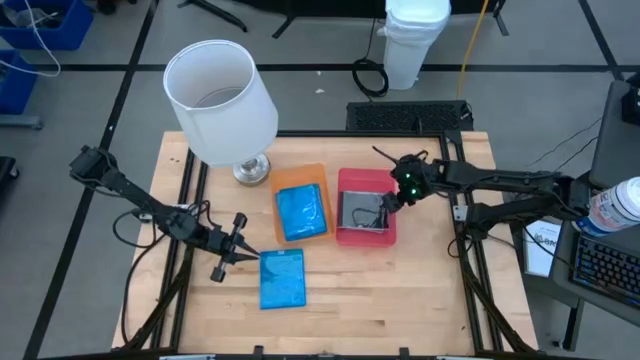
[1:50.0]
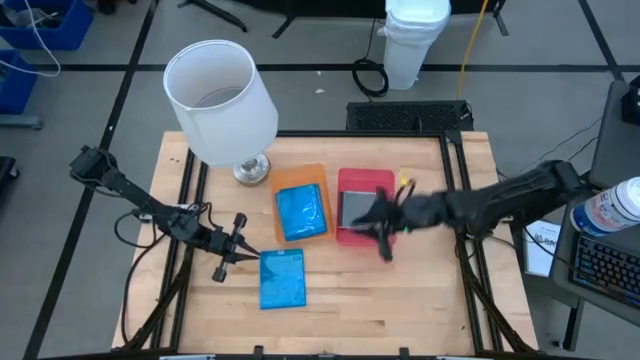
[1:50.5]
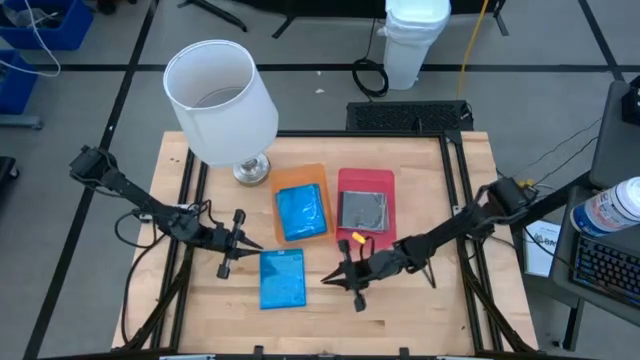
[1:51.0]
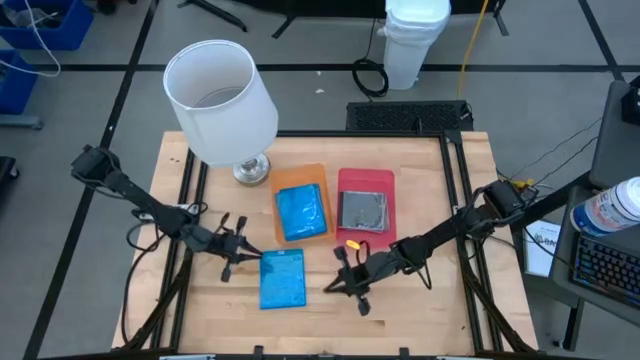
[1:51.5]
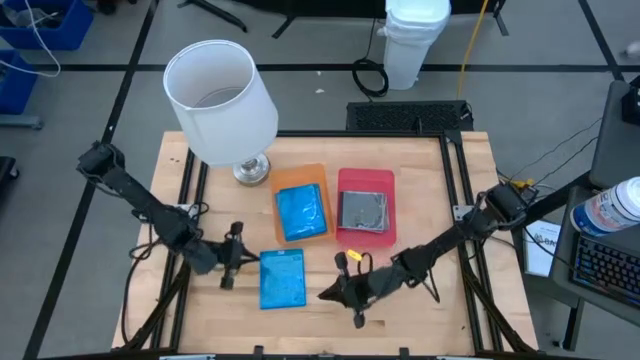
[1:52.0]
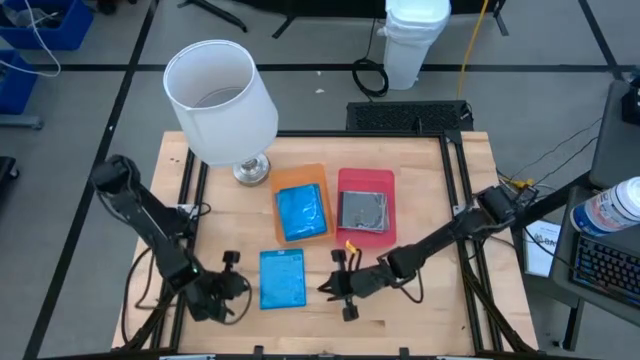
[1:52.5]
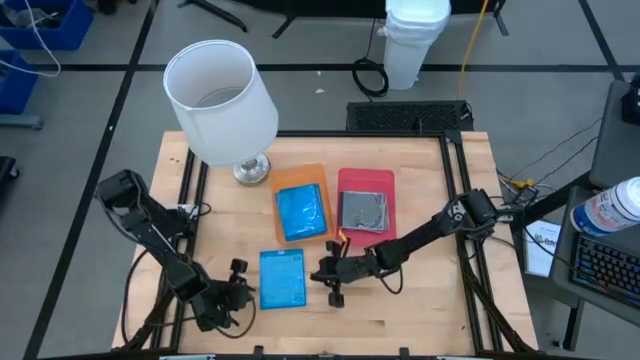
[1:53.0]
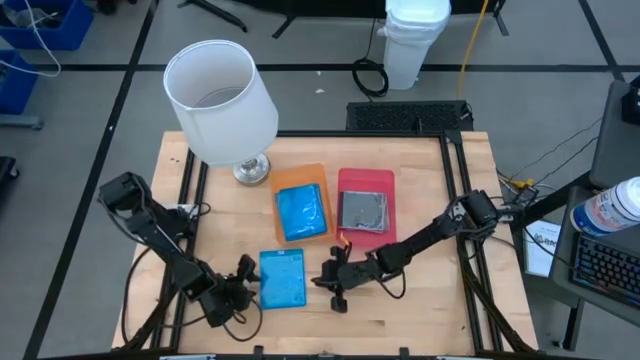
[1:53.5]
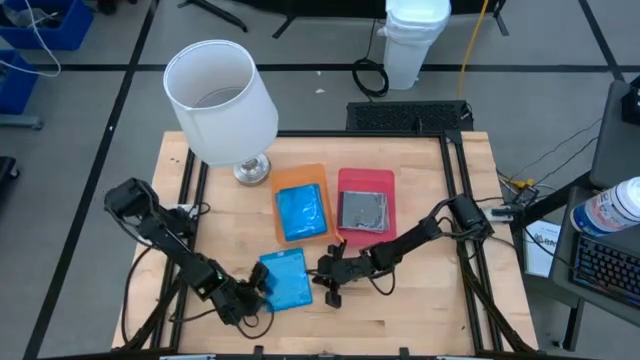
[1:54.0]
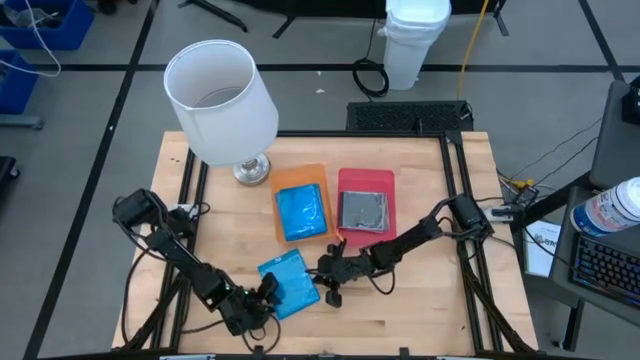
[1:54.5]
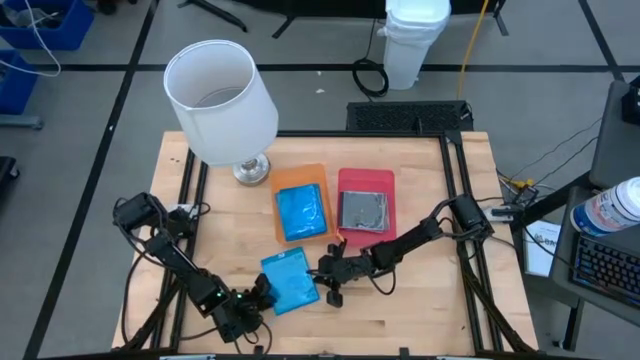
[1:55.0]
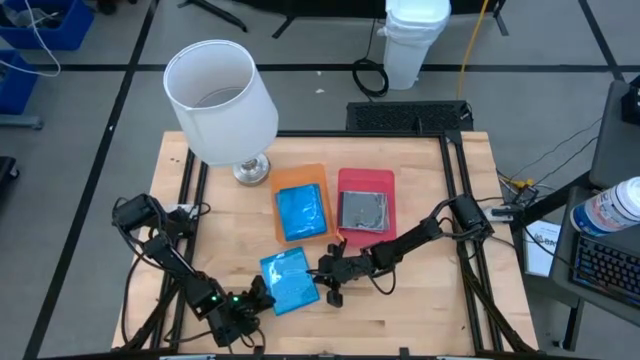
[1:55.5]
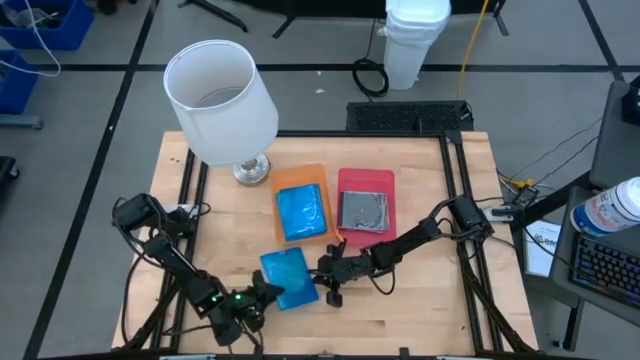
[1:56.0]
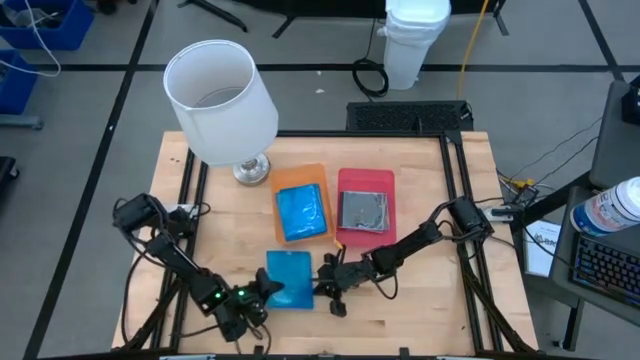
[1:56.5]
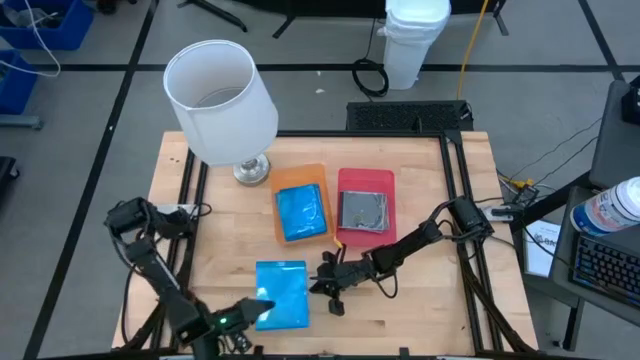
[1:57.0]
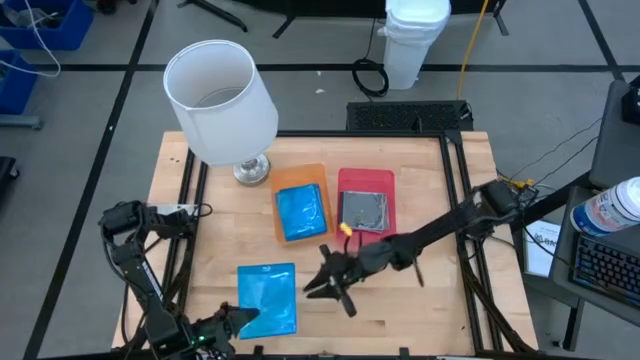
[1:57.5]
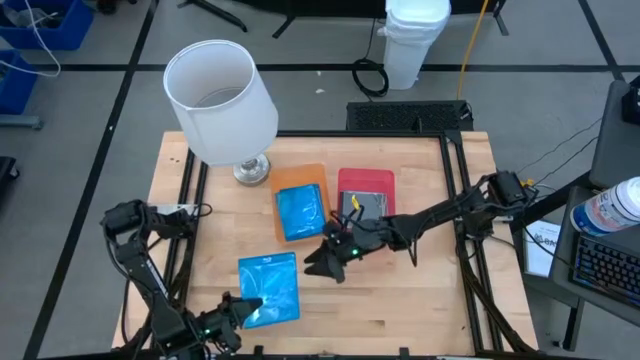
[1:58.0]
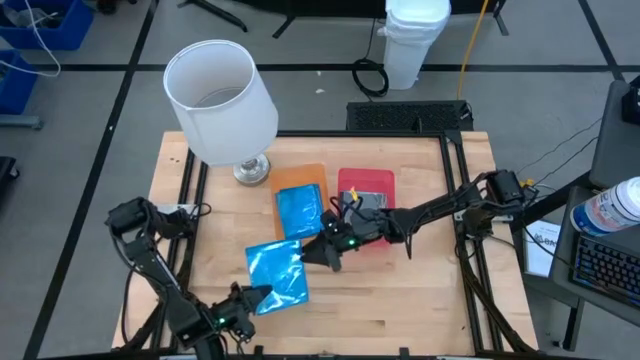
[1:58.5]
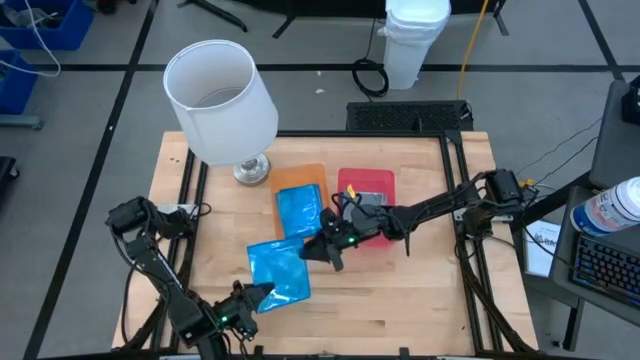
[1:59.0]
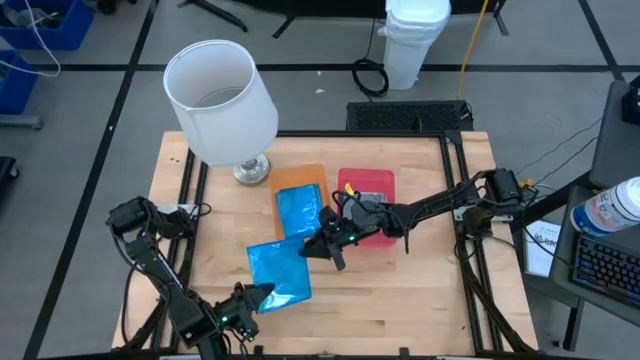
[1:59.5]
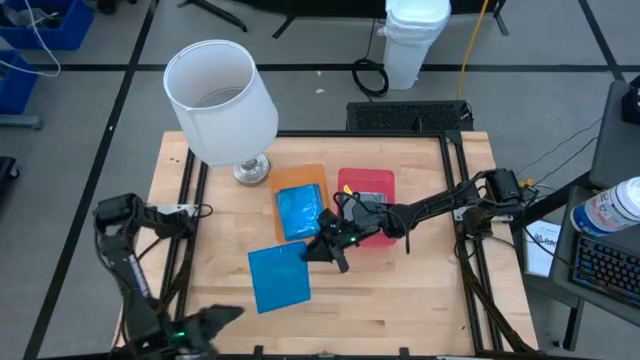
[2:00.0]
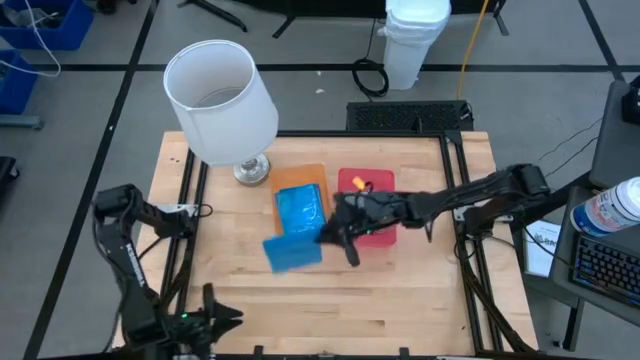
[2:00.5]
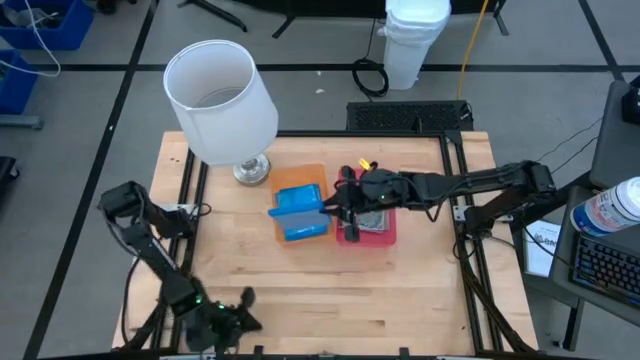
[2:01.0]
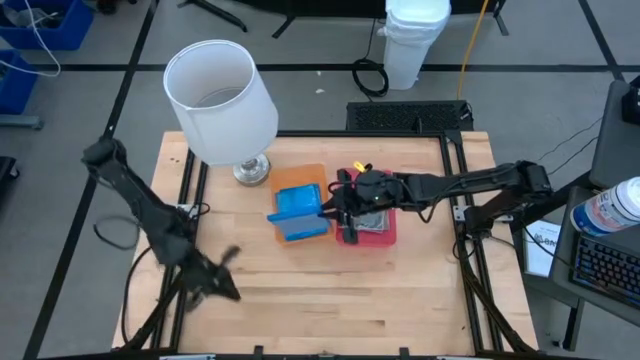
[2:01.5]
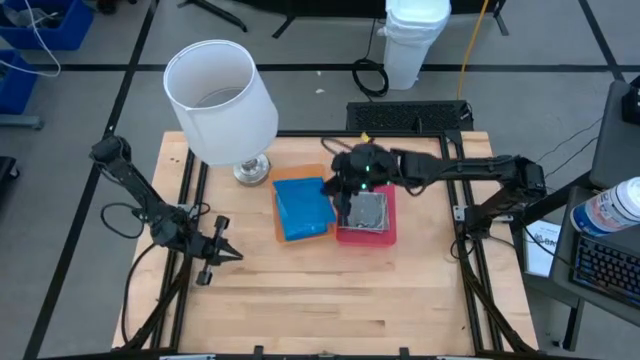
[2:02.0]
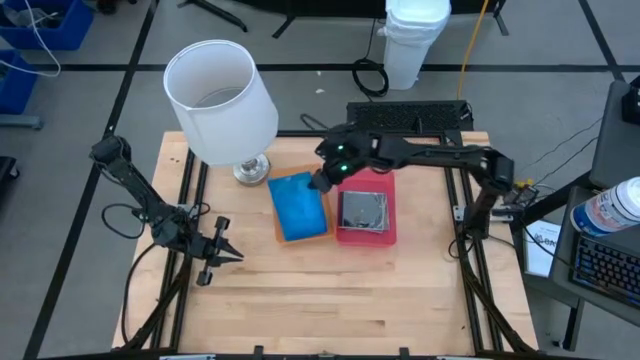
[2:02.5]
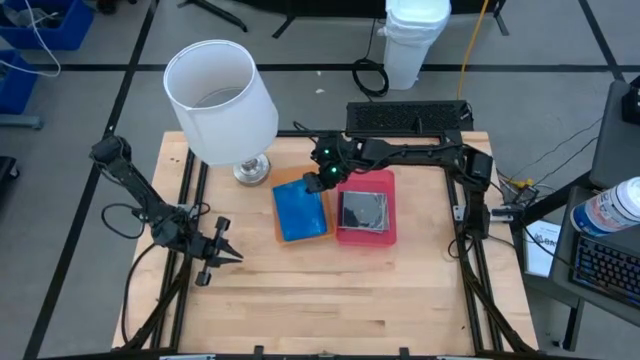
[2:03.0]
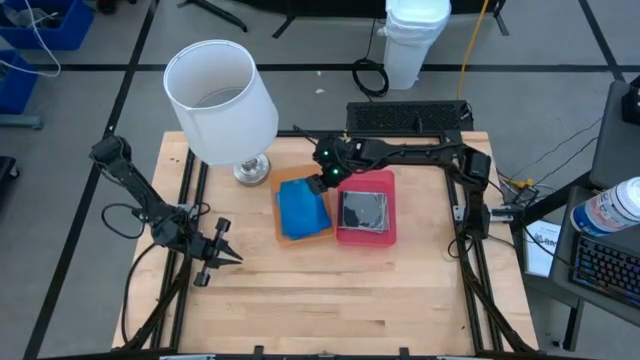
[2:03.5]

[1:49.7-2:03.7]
Task: Pick & place jewel cases by type
Put the black CD case into the orange bin

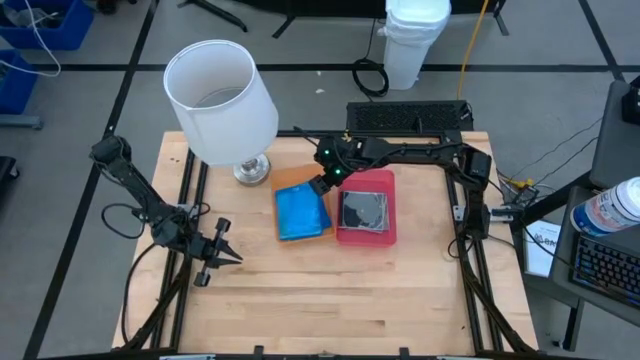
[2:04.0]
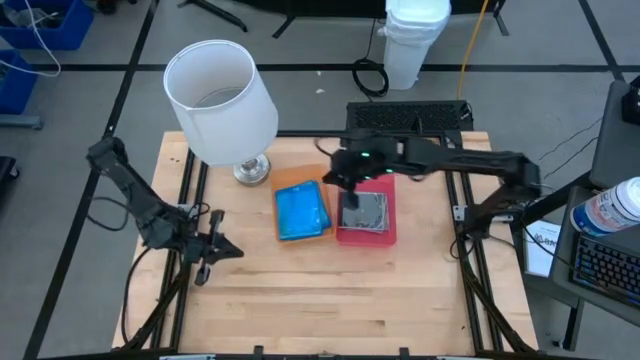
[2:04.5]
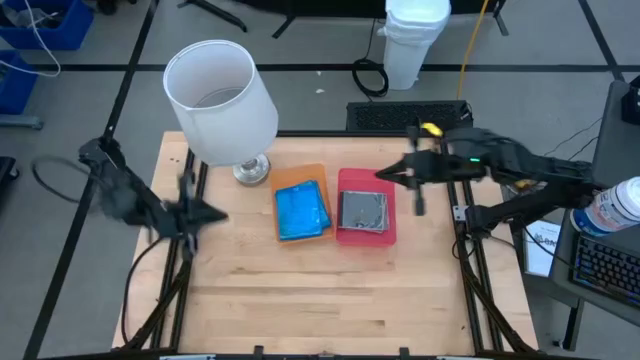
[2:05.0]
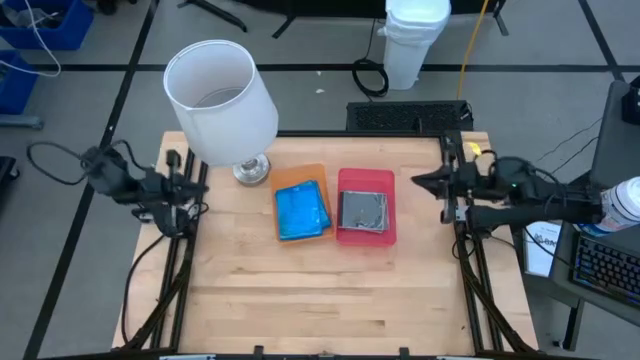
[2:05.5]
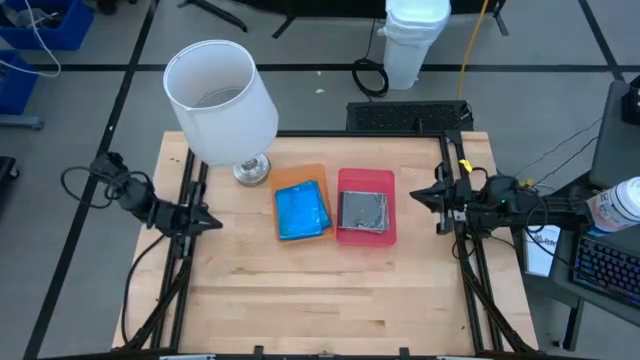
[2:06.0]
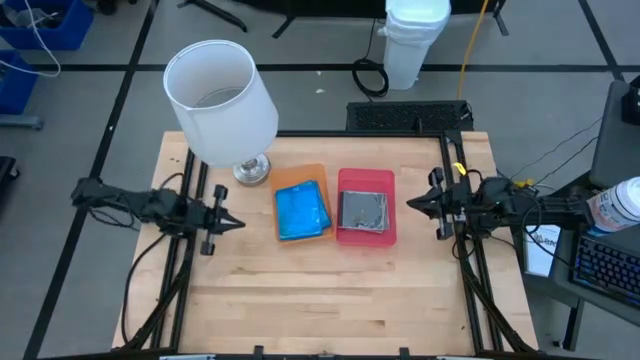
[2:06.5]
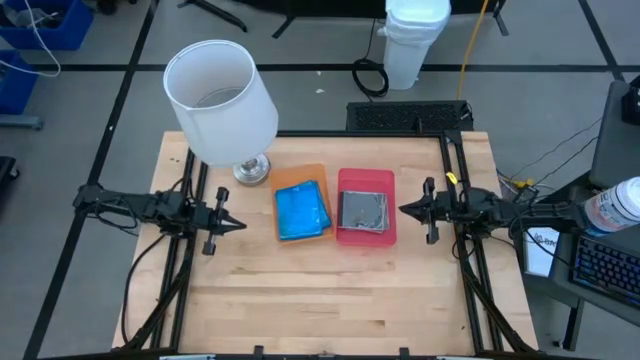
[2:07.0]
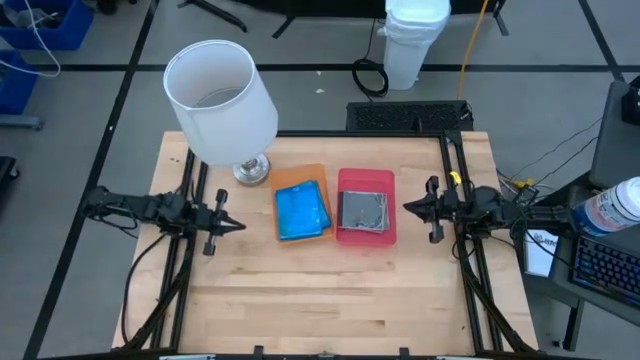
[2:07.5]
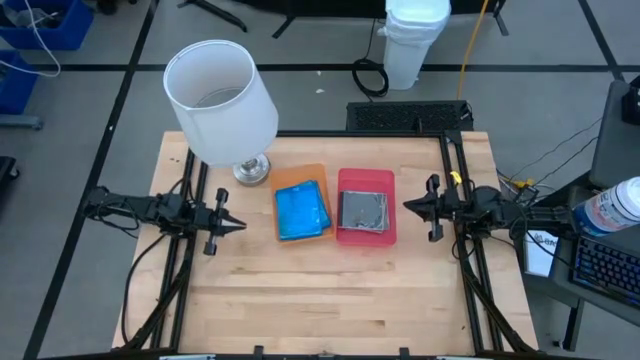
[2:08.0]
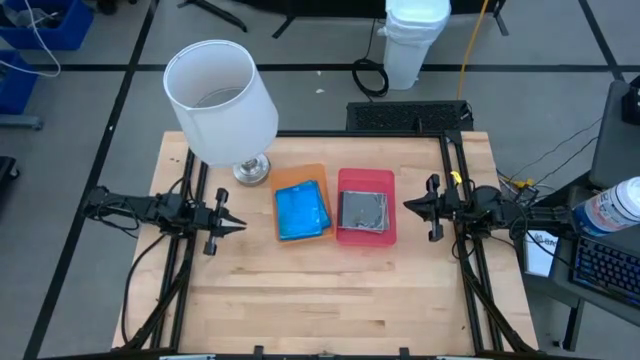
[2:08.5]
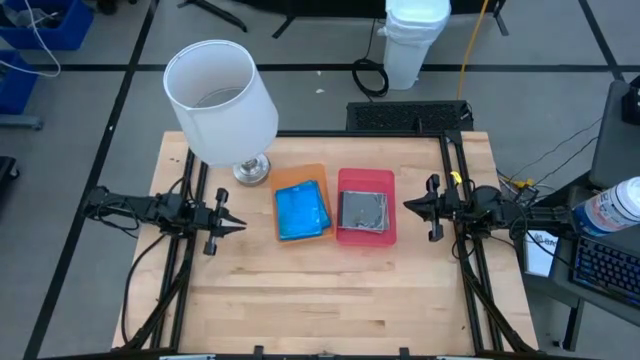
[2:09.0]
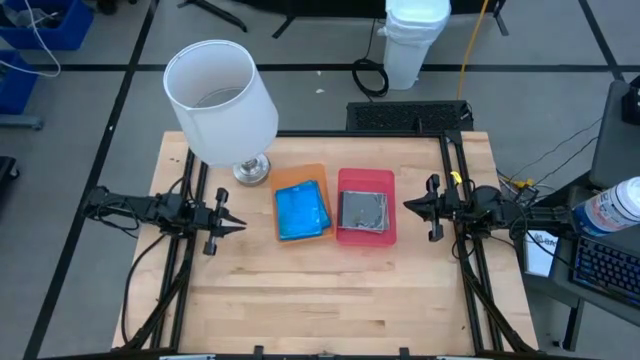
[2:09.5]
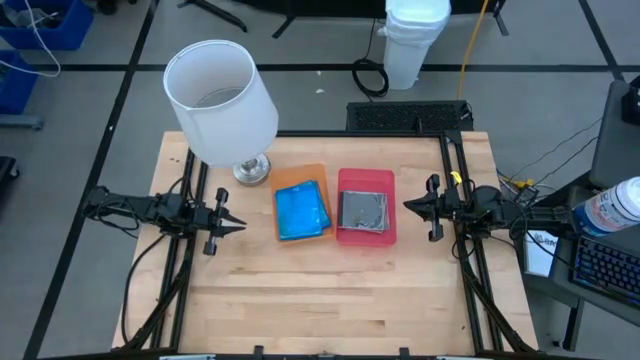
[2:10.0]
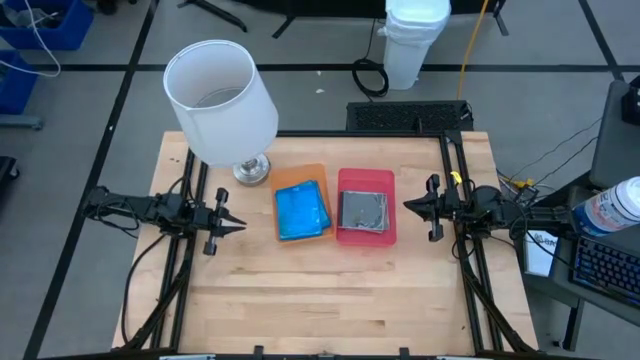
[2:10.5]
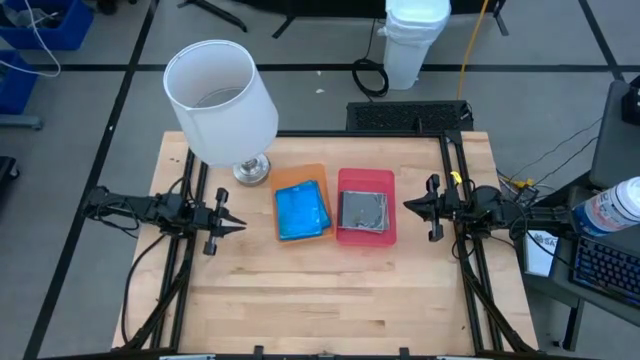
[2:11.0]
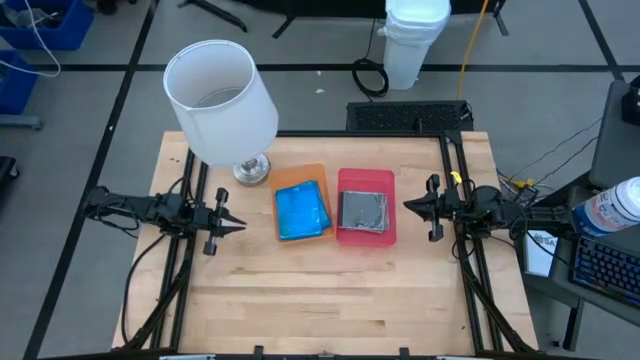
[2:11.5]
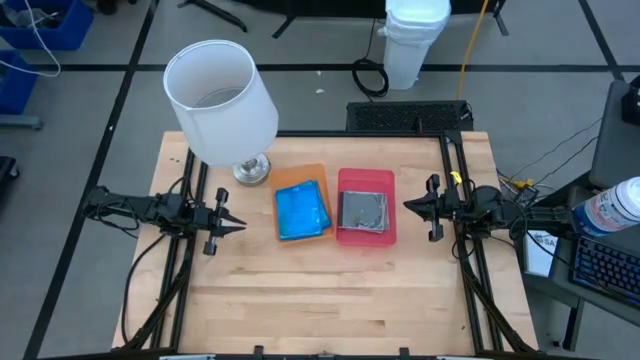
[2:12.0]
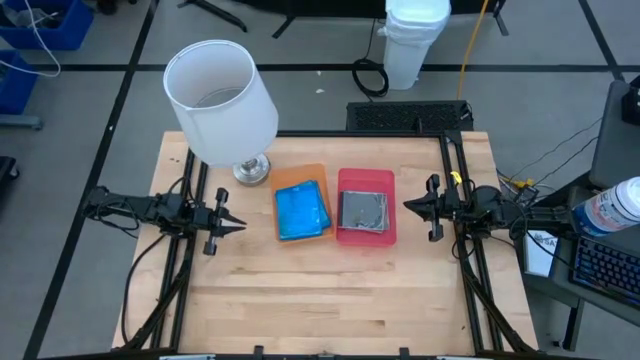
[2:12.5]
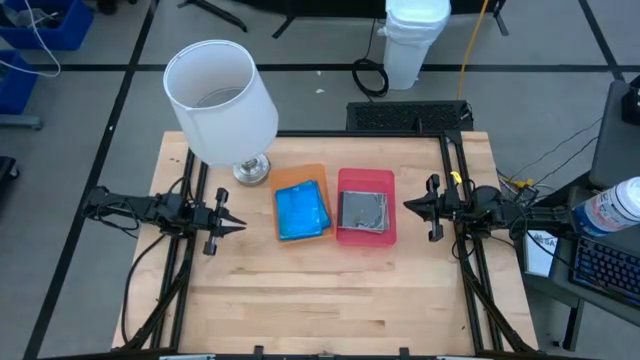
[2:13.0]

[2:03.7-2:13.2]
Return to Home Position
